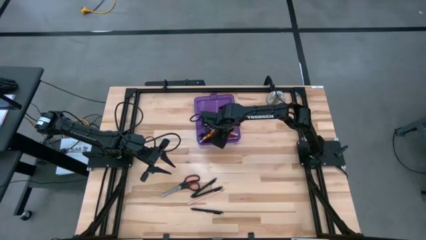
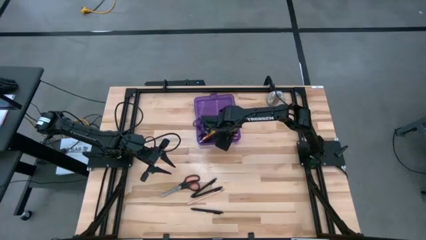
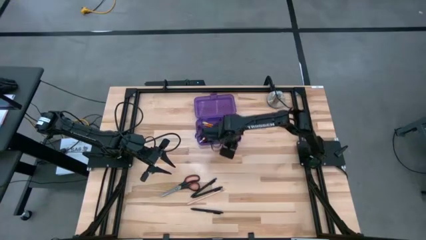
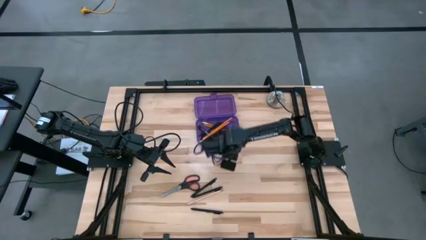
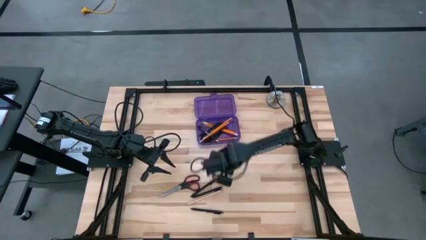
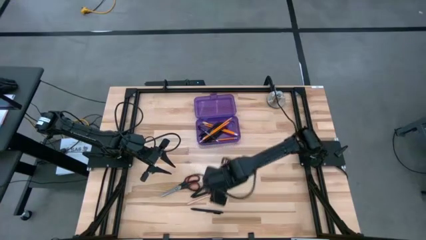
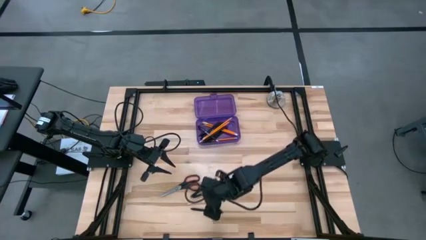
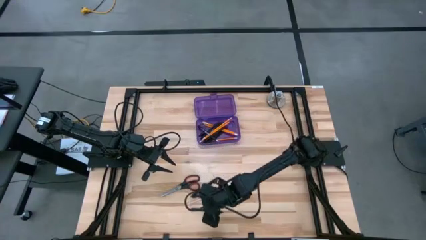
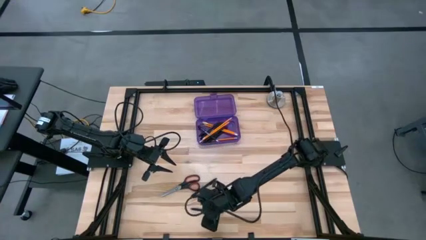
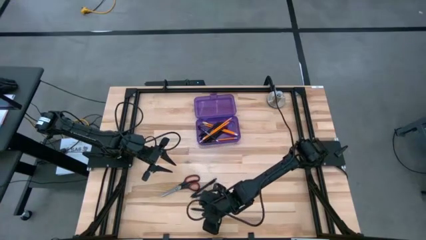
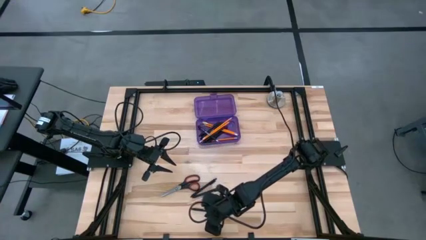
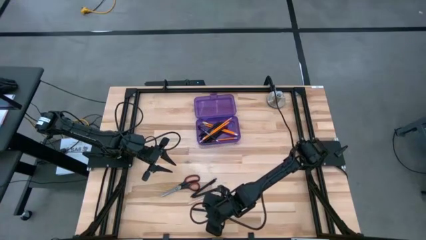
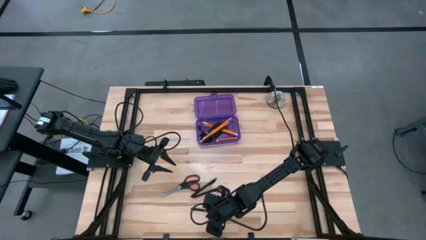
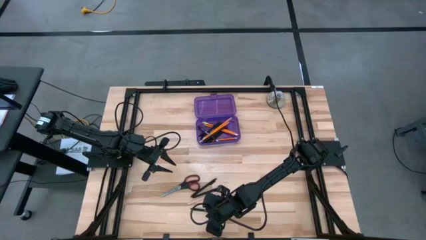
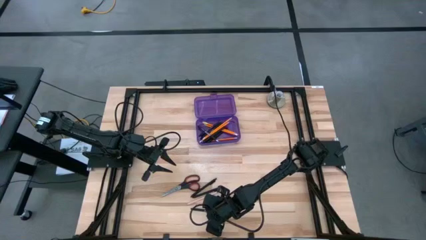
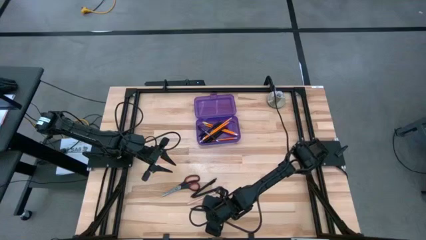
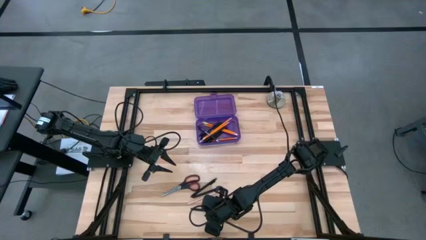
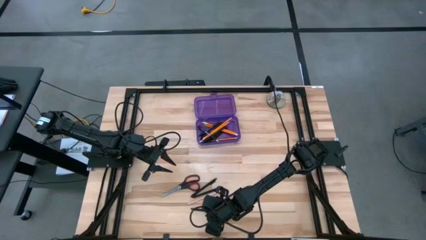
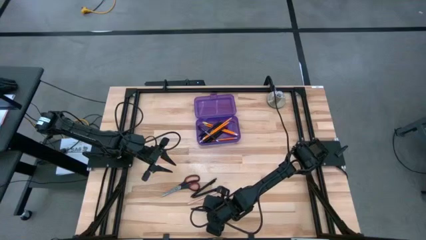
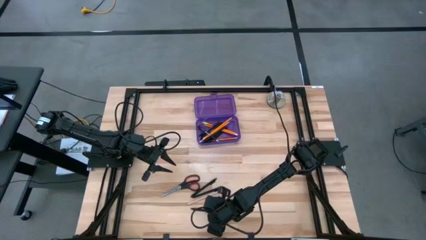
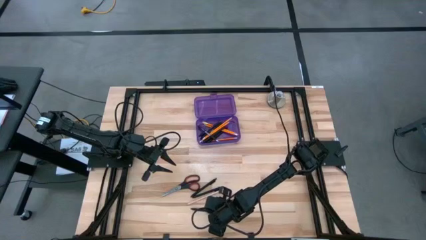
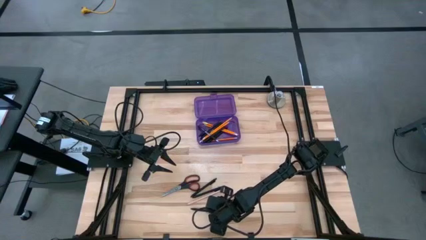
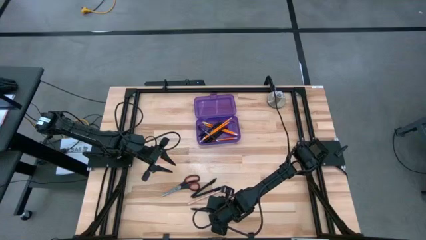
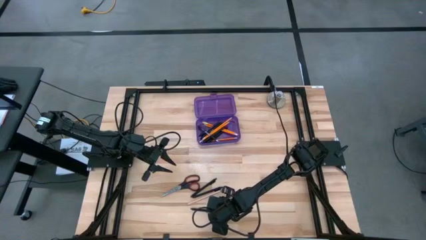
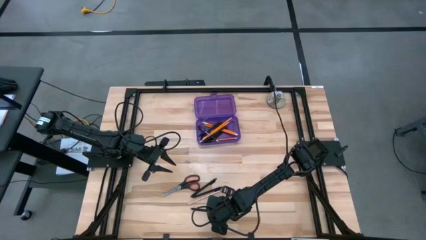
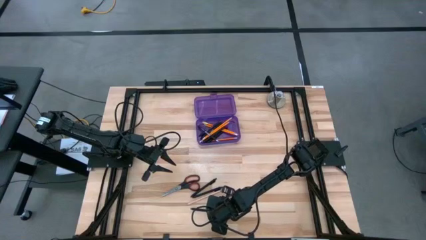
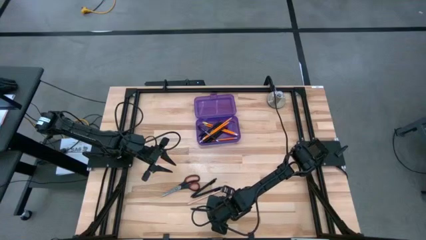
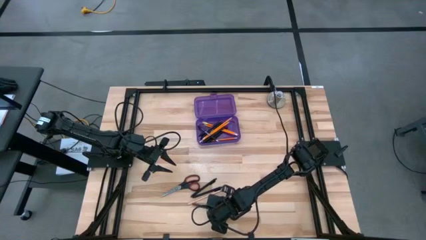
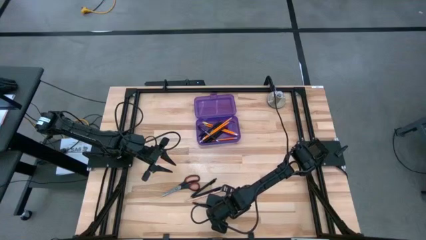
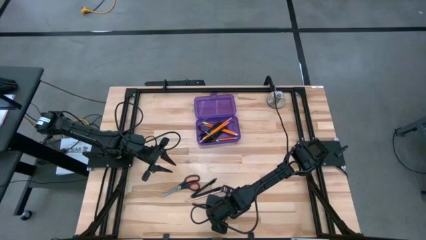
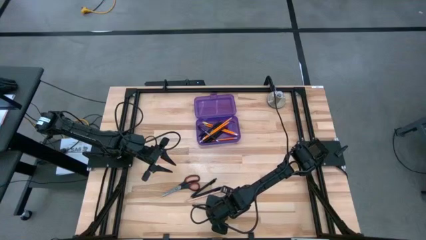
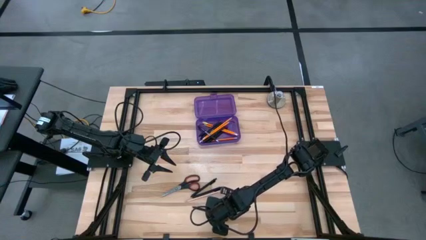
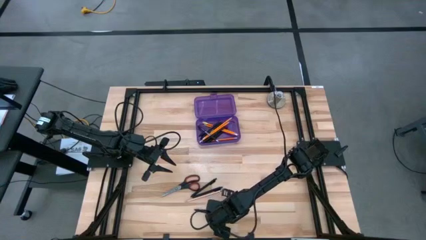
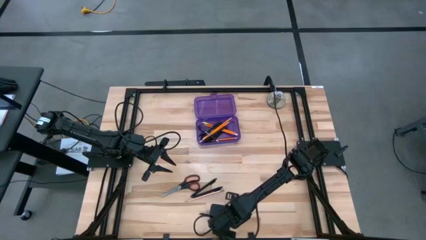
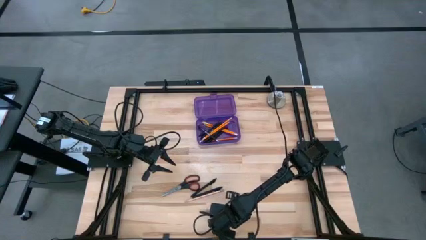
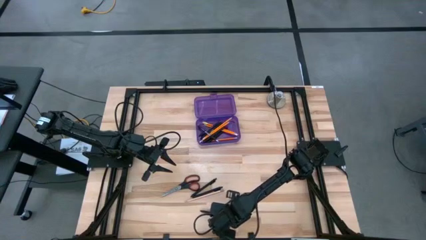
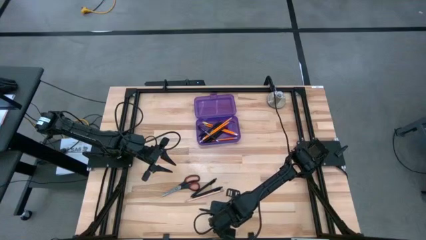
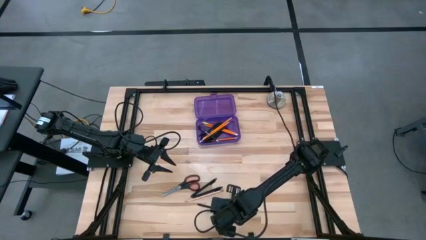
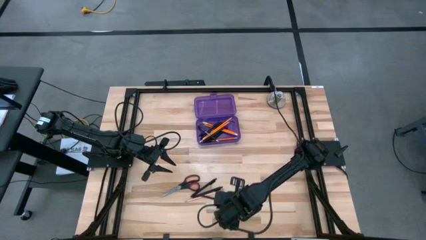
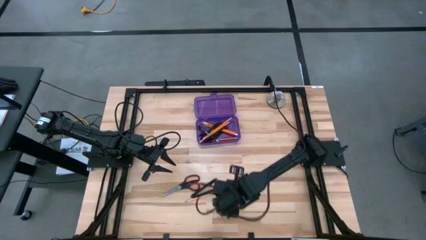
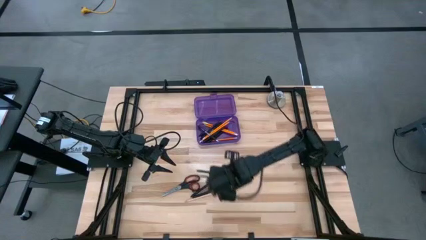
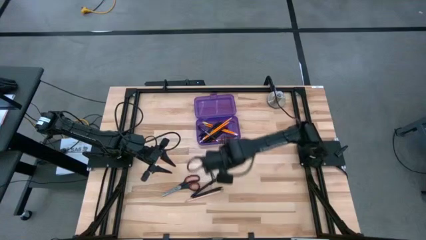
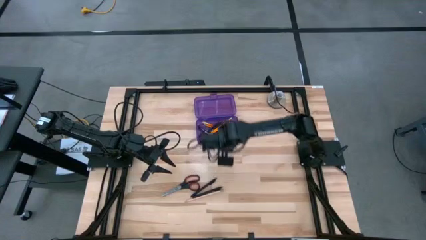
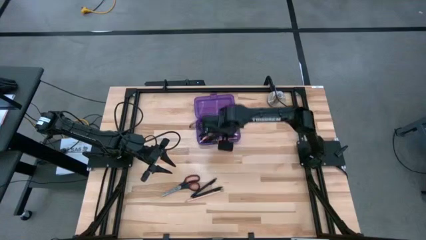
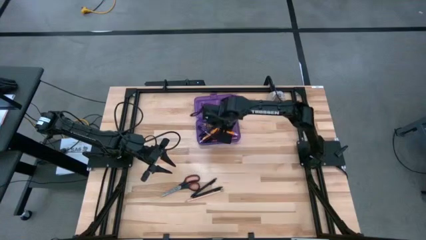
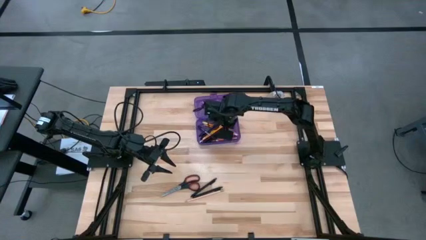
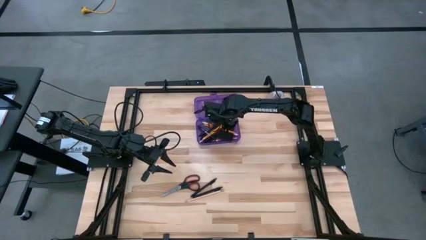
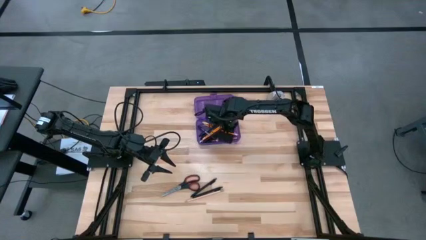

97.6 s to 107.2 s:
Task: Pick & place school supplies into a supply box
Put the black pen into the purple supply box

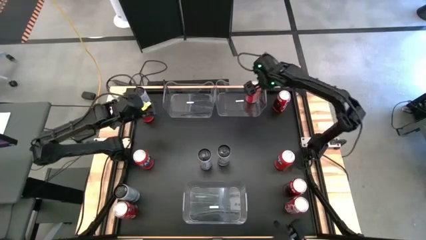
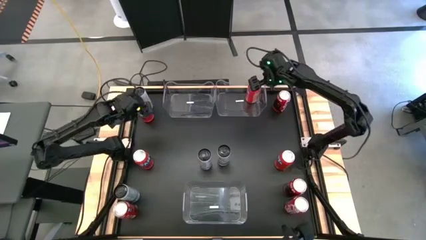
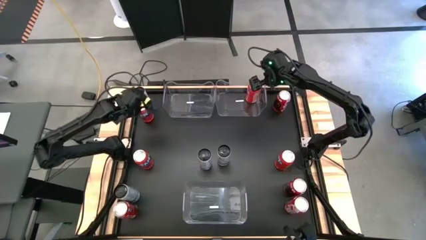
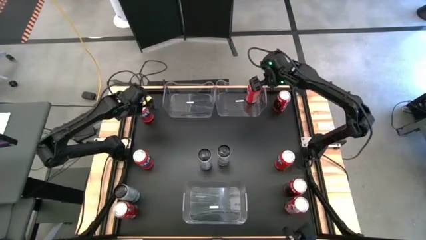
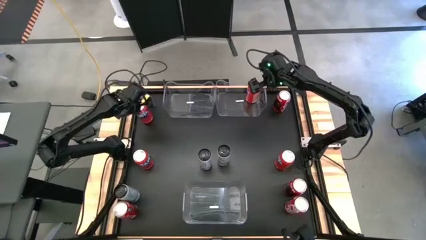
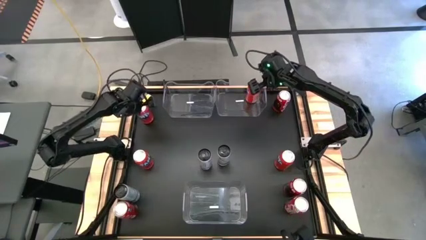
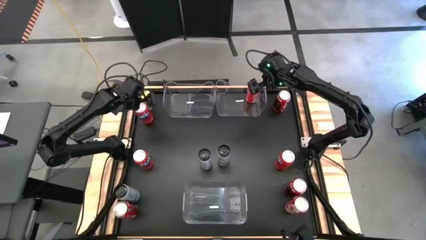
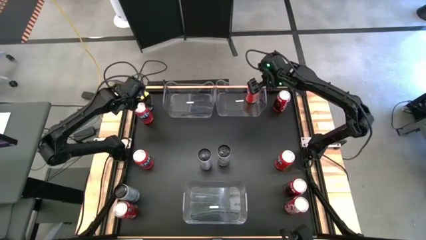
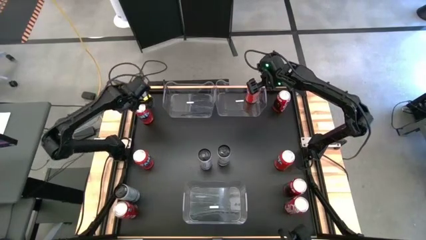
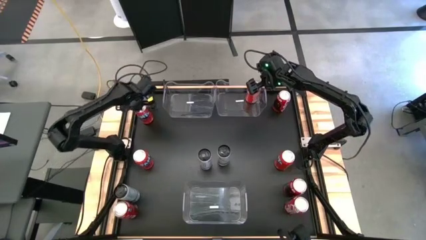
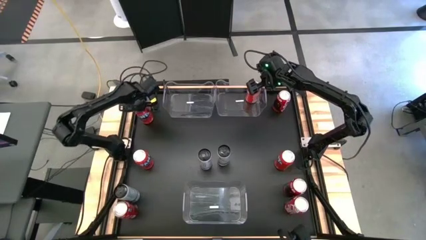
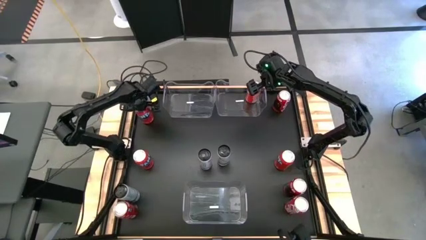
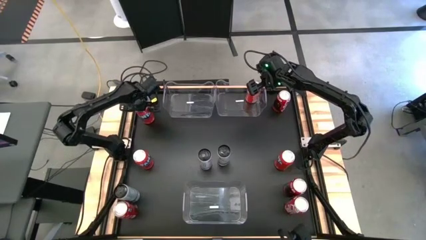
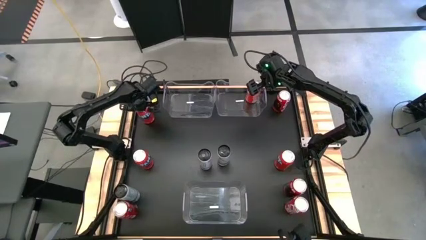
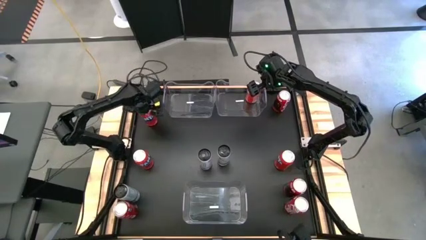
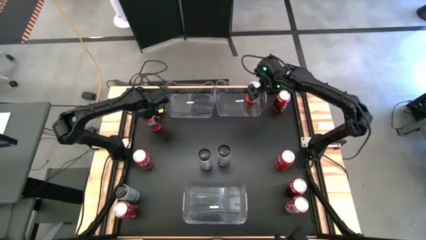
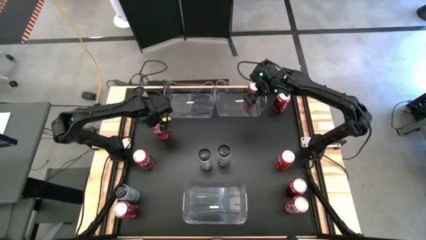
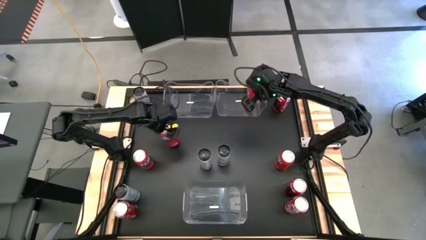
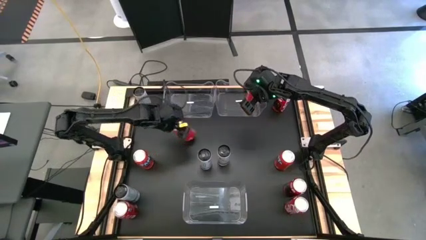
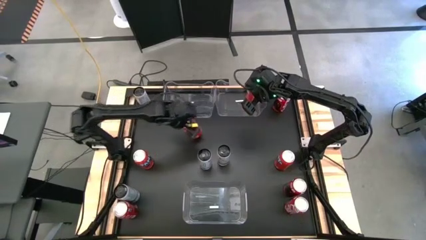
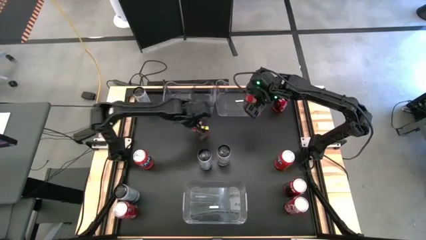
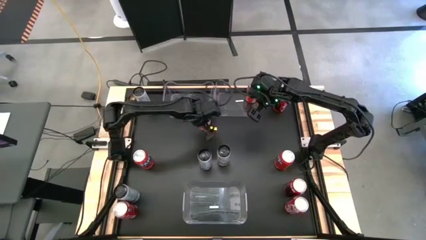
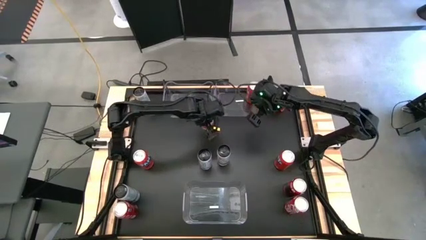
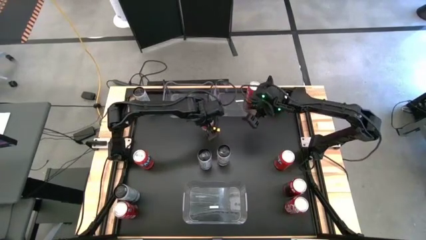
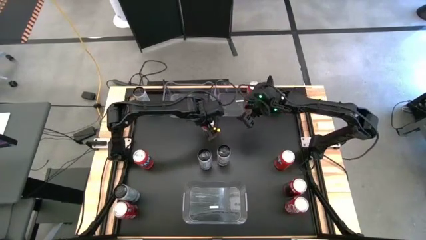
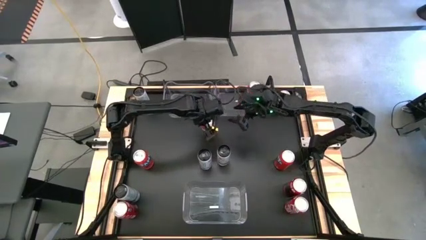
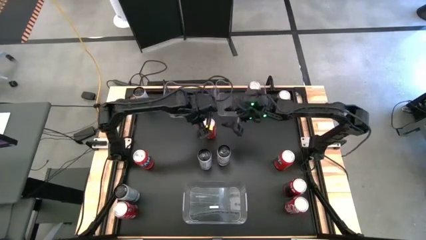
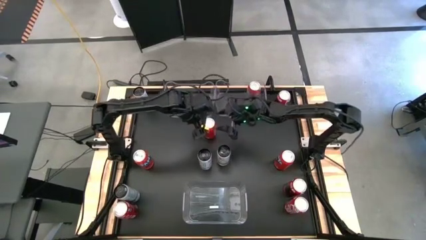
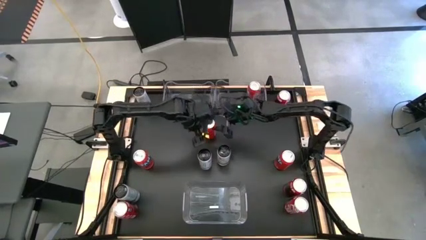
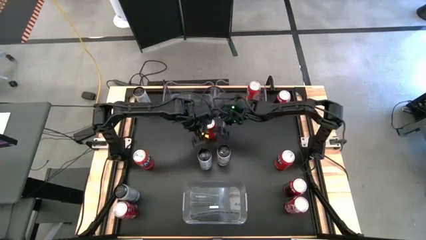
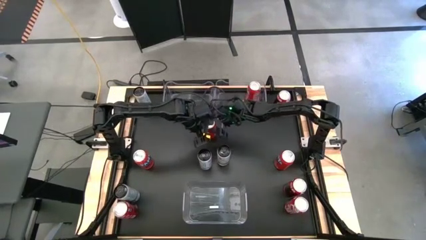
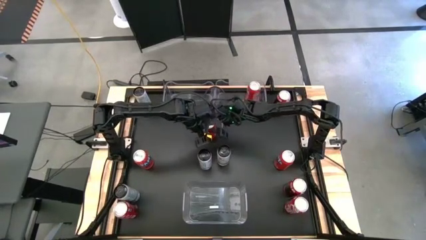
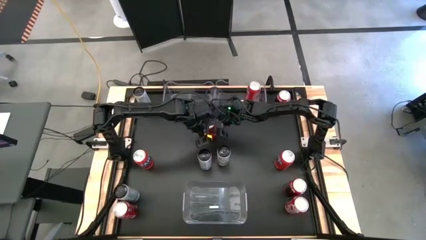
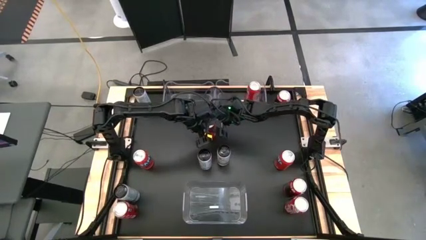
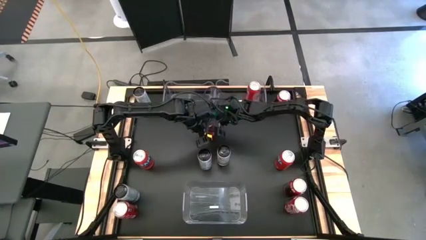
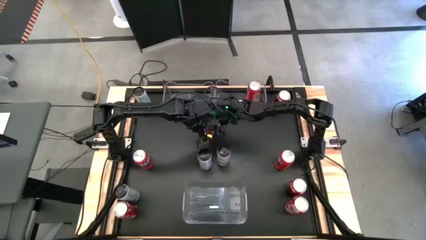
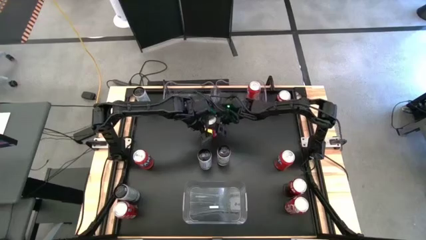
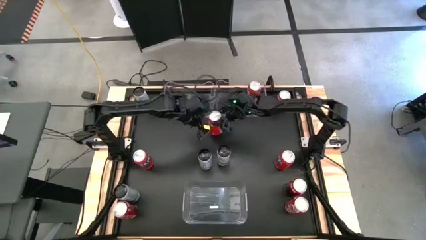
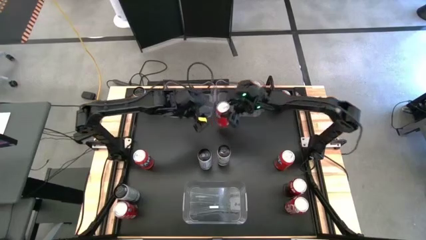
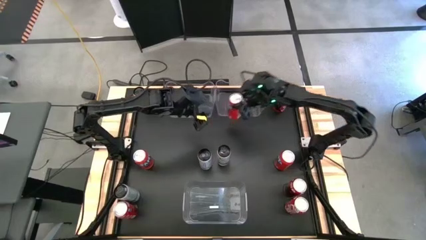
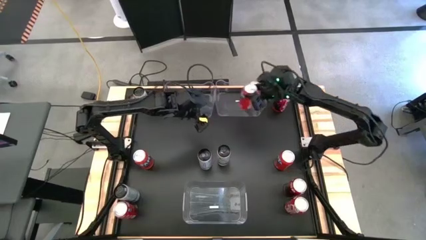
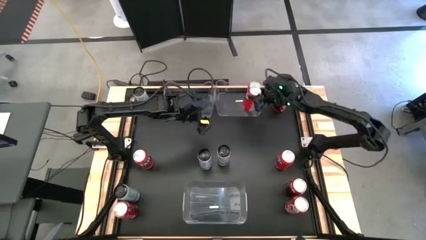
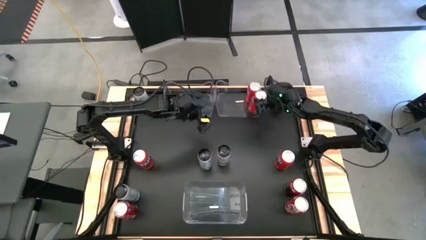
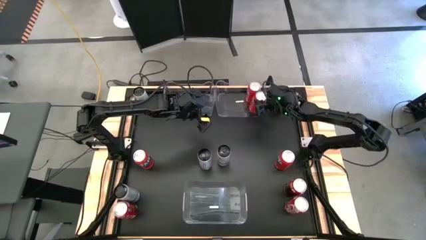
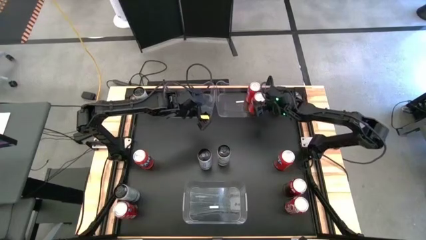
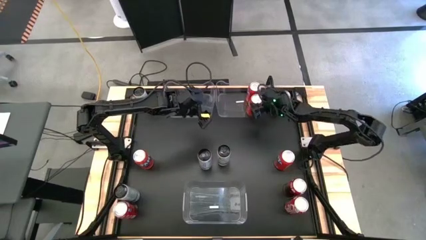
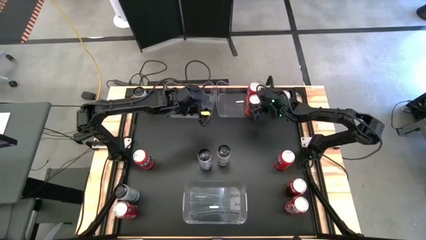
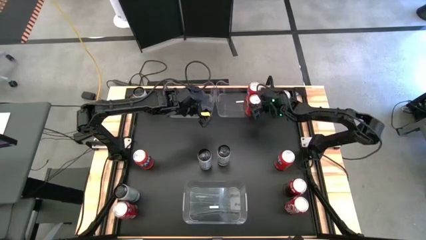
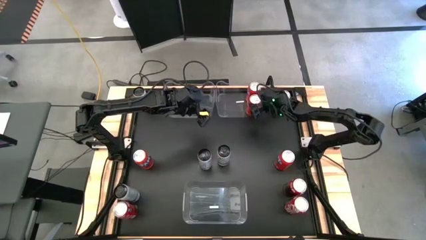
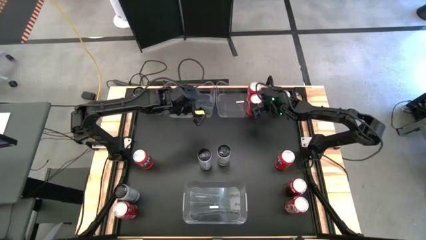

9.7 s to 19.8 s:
Task: Sort soda cans
Put the top orange soda can into the top right transparent bin
